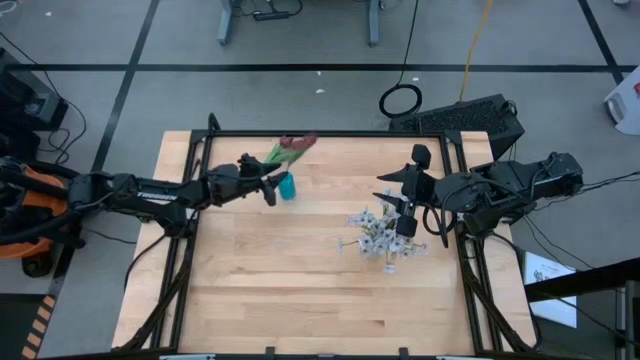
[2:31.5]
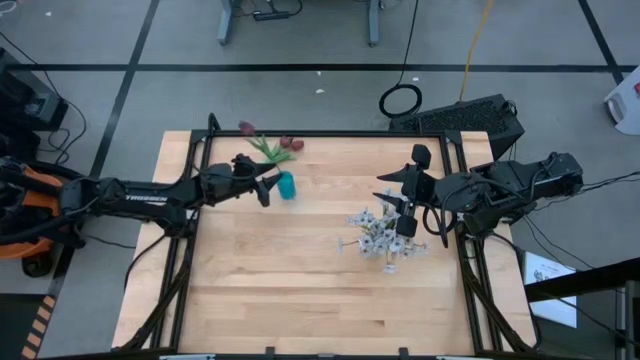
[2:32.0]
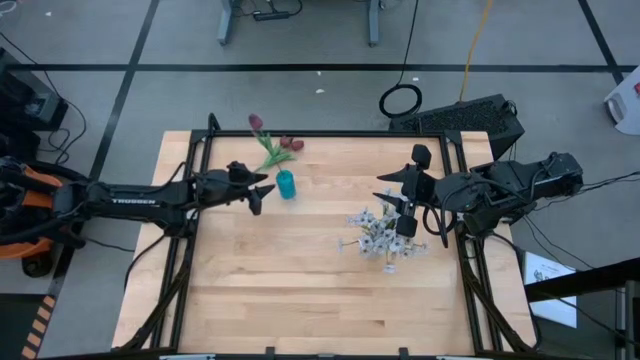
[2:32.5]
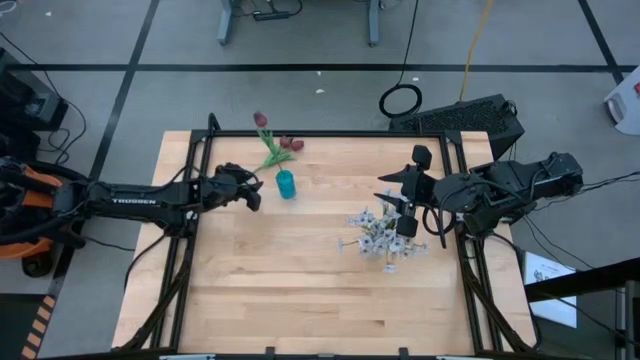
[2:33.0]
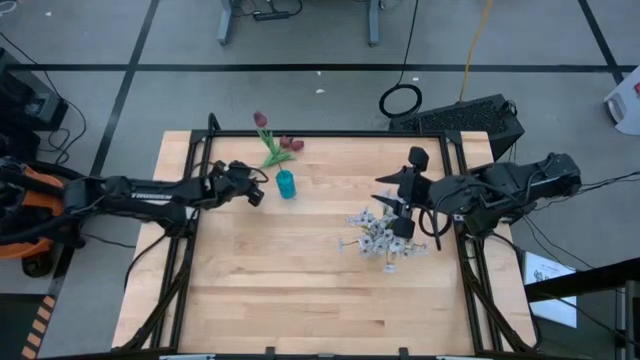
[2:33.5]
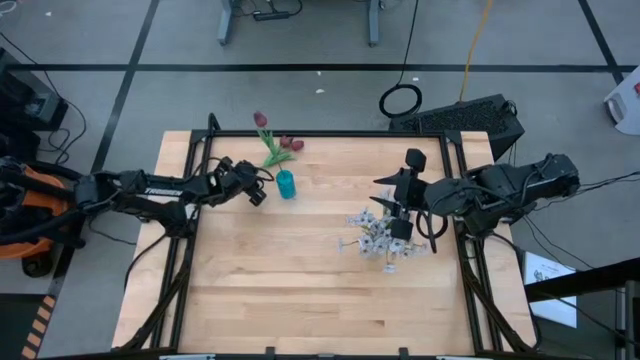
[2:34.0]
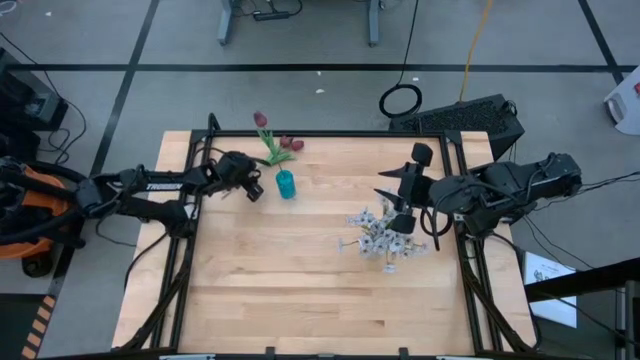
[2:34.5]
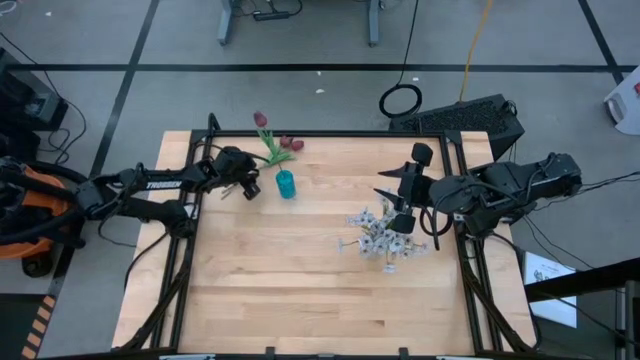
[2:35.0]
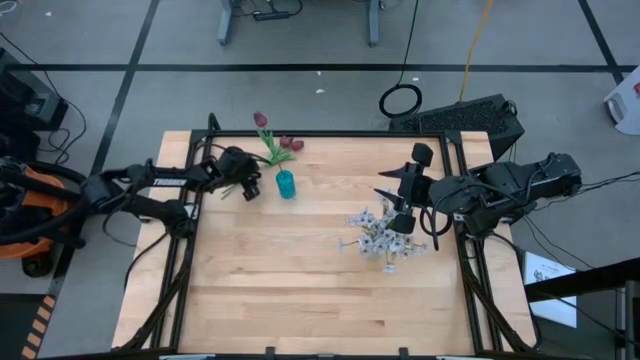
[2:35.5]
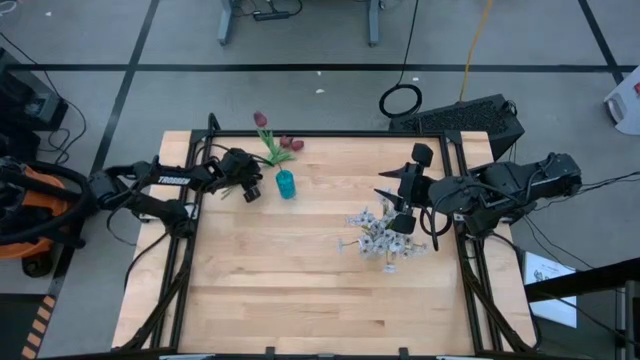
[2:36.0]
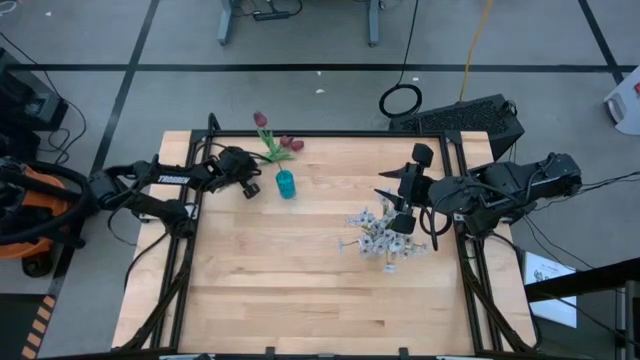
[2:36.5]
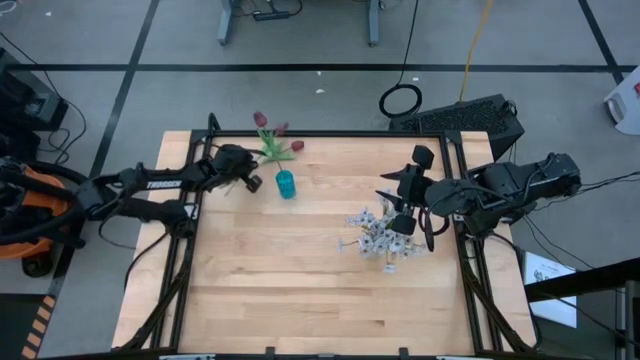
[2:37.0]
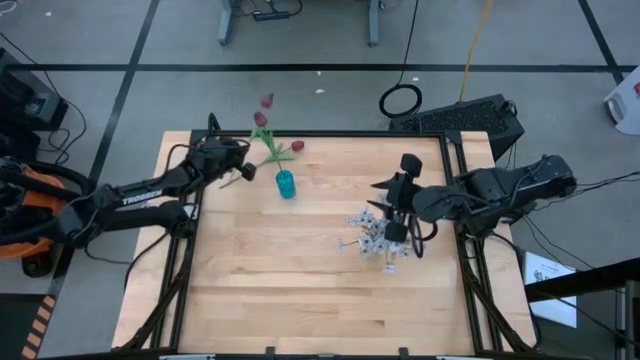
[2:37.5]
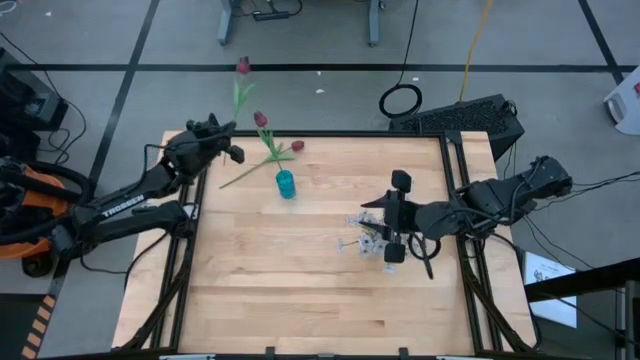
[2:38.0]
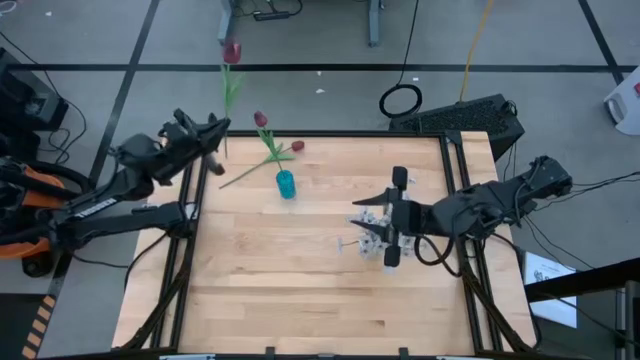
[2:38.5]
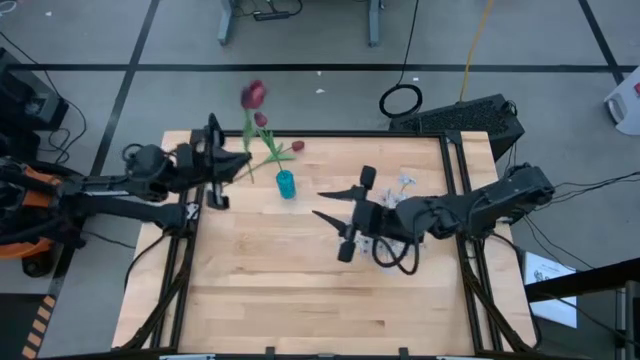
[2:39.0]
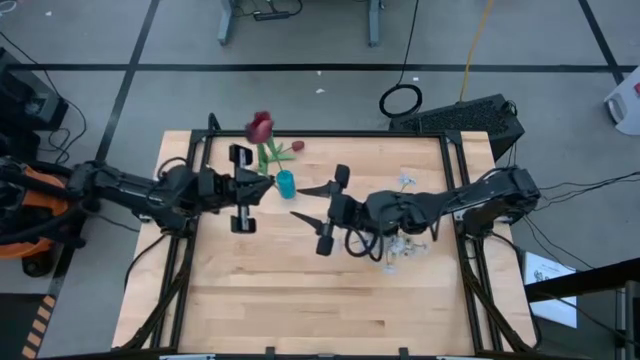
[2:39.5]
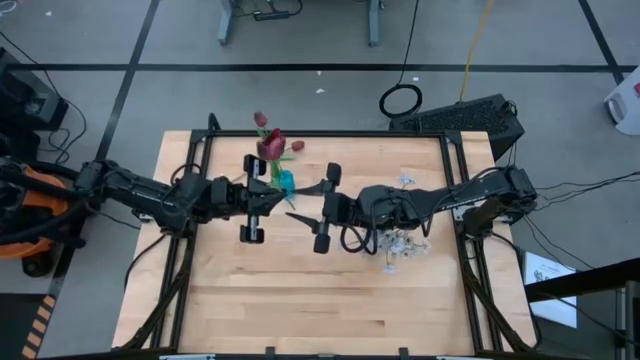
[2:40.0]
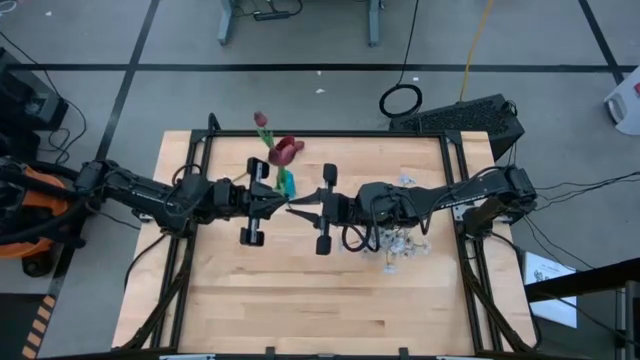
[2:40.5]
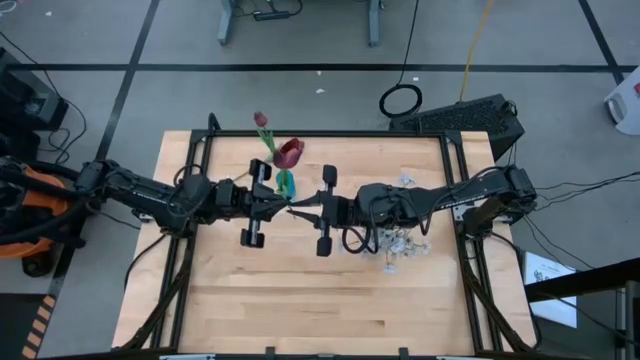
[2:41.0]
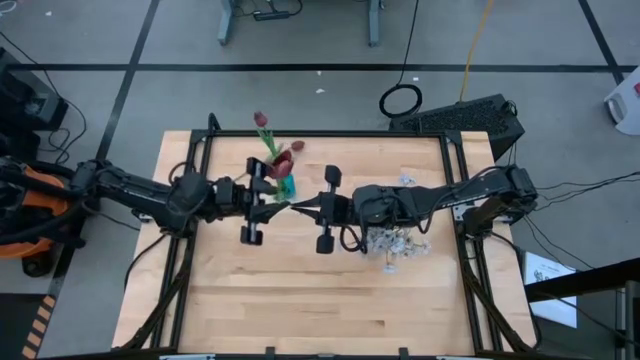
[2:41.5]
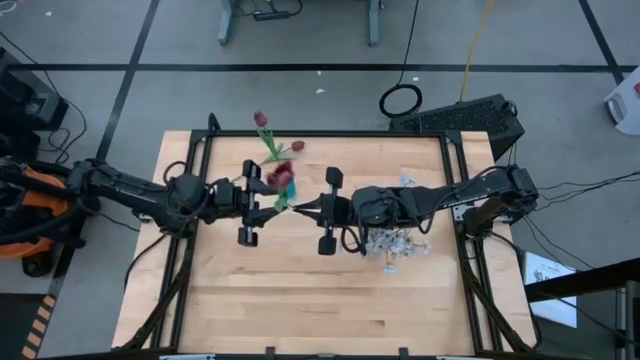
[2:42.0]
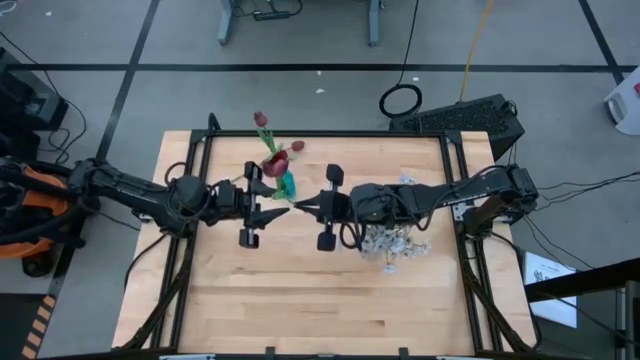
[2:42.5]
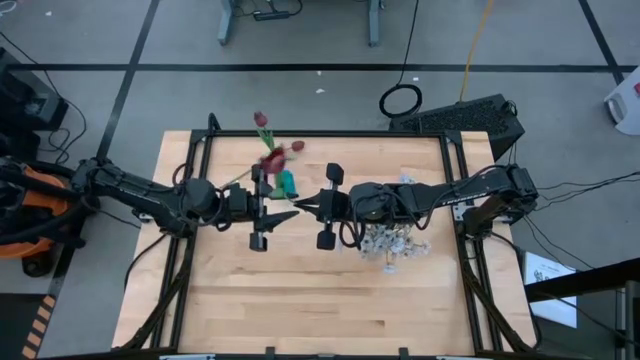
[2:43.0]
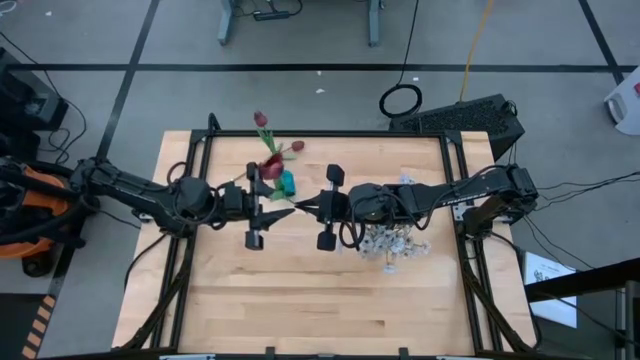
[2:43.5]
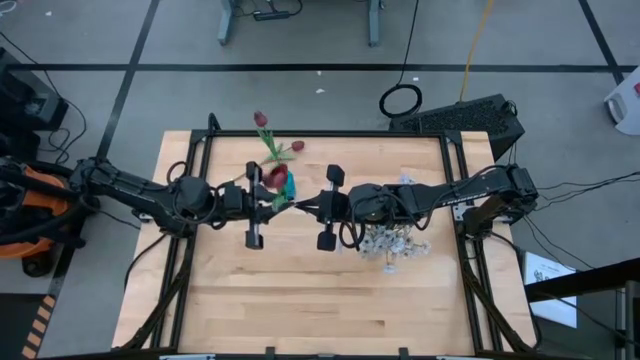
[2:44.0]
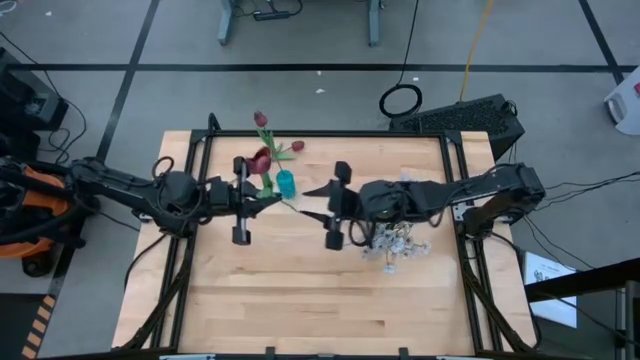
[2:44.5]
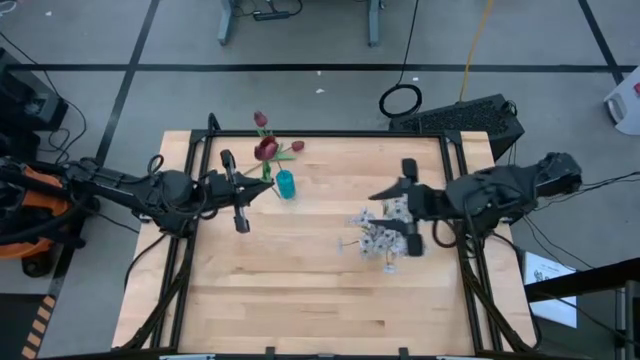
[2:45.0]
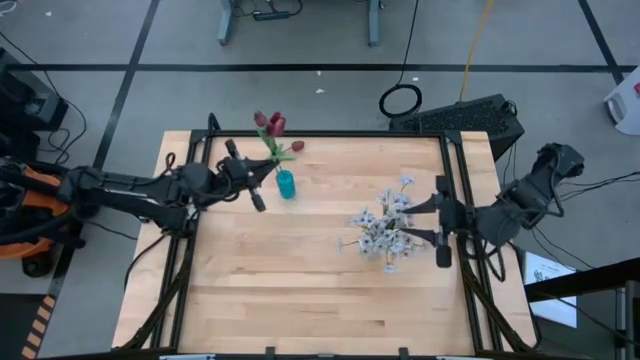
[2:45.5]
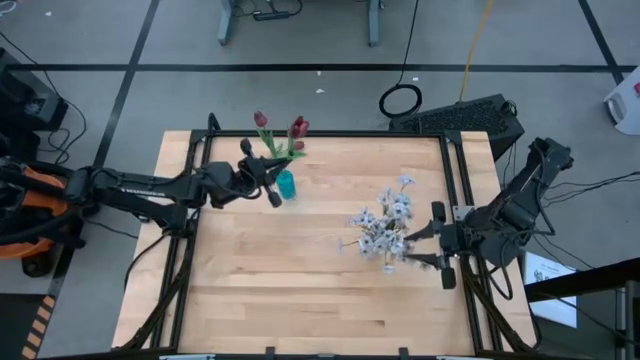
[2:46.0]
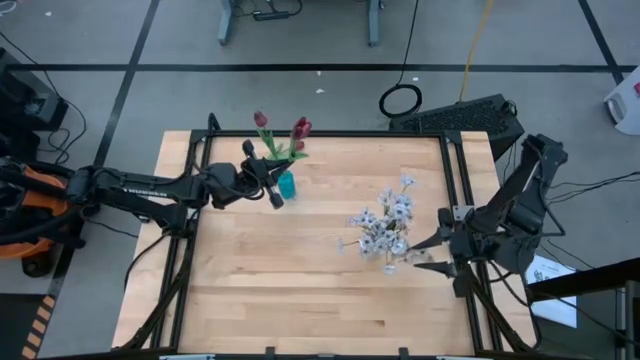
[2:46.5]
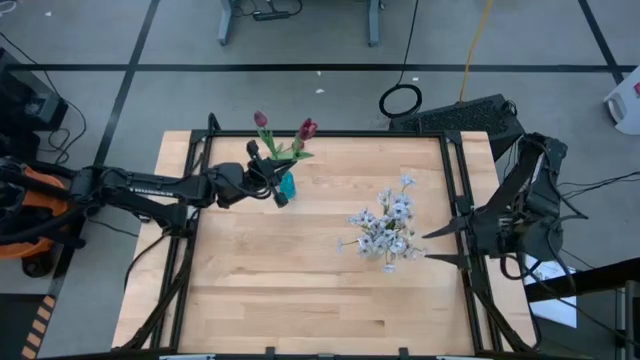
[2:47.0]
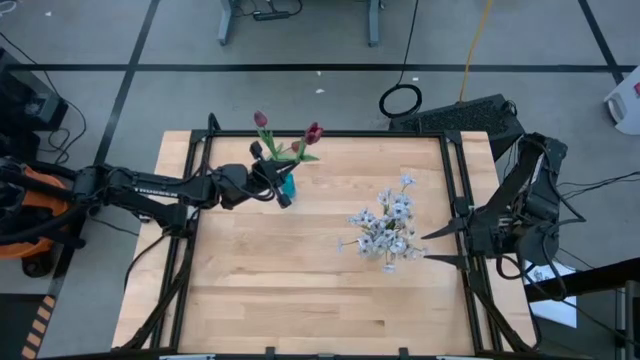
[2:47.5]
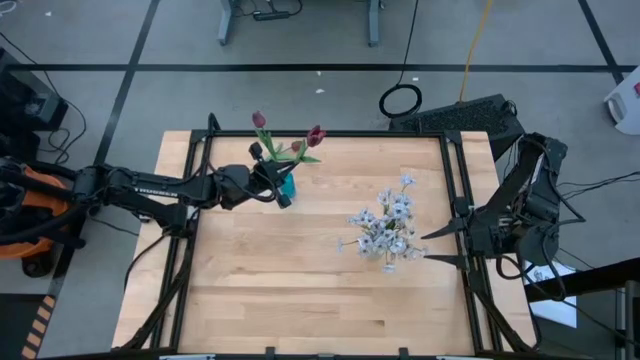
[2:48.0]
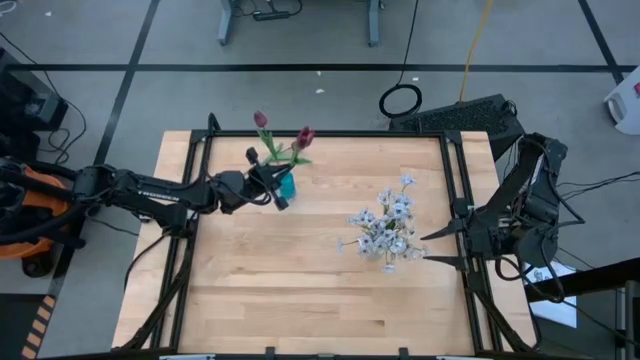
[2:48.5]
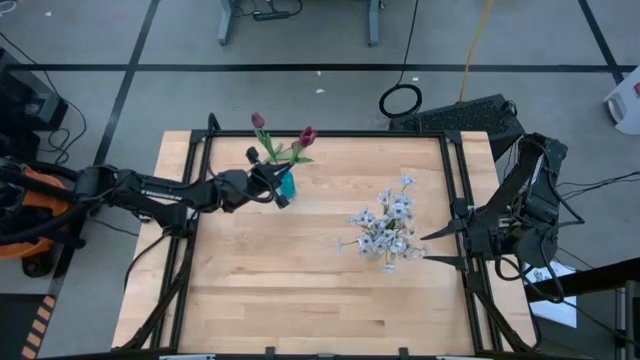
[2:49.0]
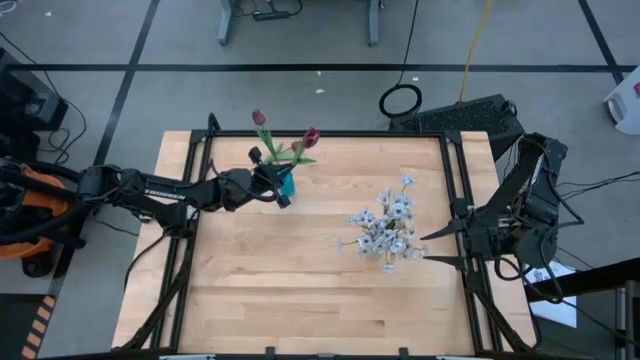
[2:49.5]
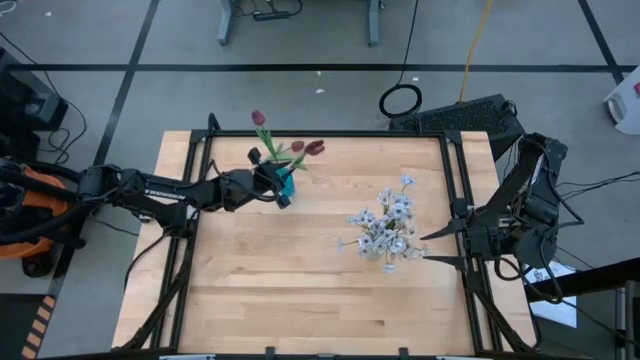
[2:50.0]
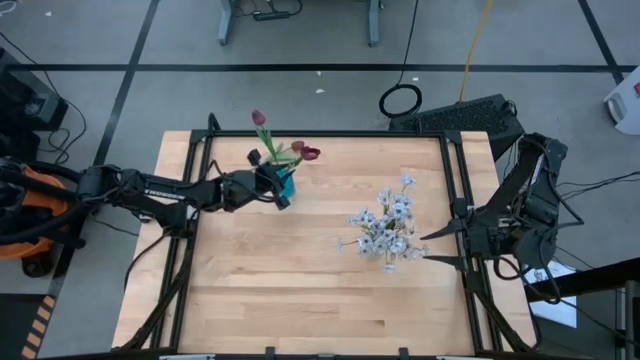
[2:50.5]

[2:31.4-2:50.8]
Task: Sort flowers into vase by color
Put the red tulip into the blue vase

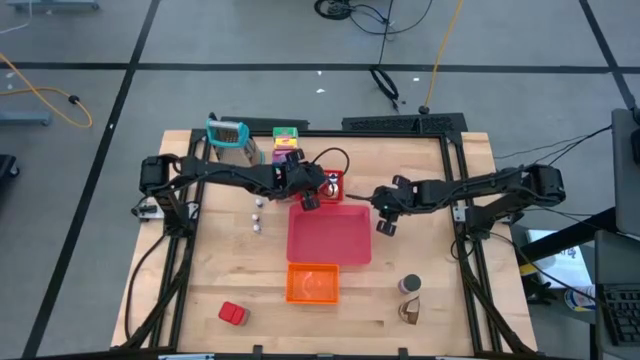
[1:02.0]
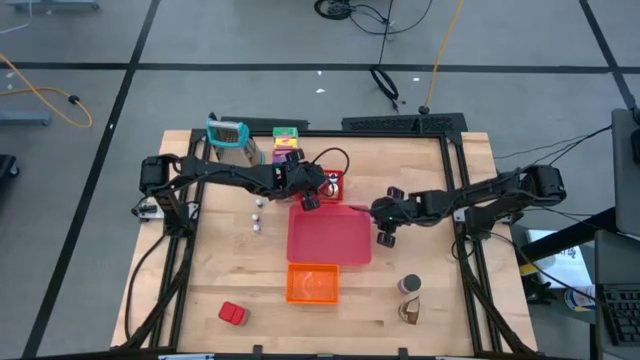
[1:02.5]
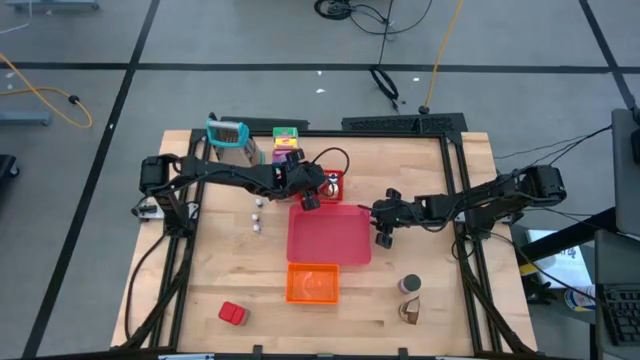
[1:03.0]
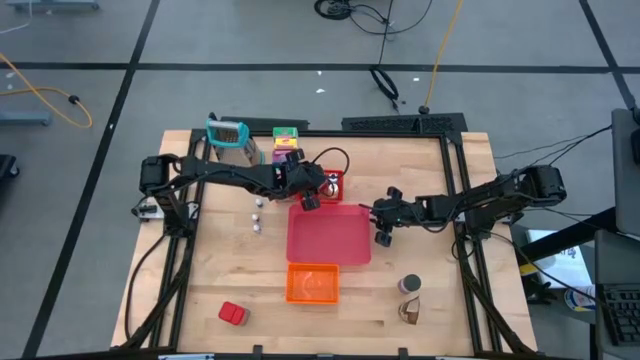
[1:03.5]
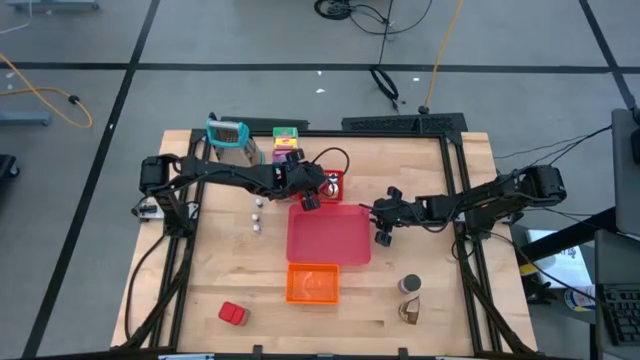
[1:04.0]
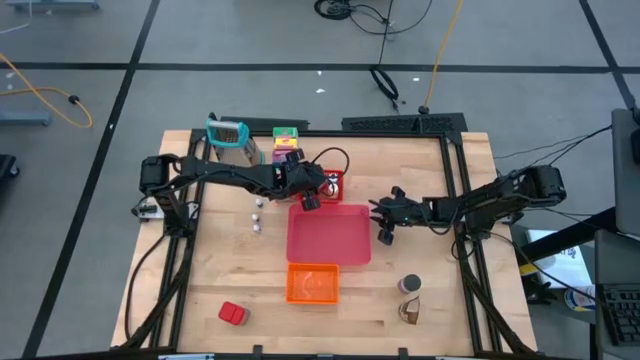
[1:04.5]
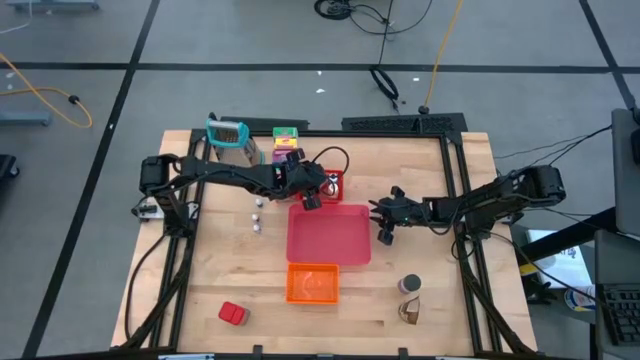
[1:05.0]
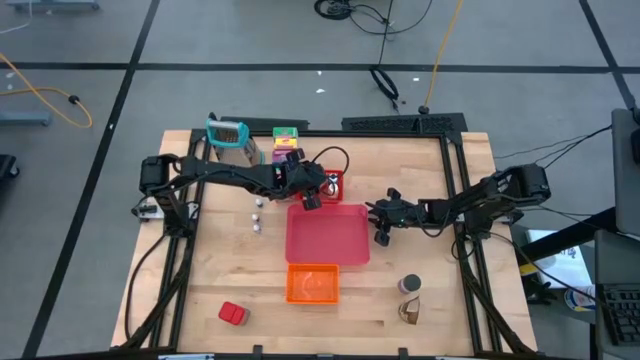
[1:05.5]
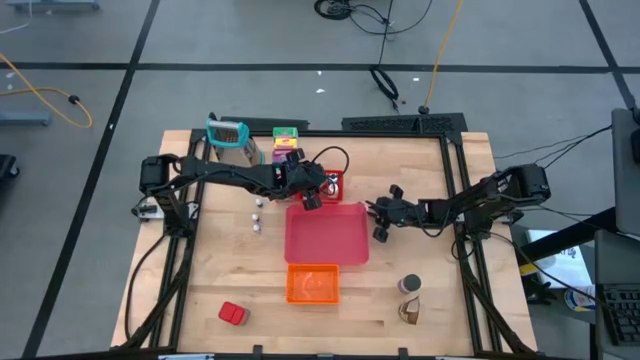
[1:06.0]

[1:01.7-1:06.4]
Task: Pick & Place Kitchen Items
Put the brown food coloring bottle into the red bin
